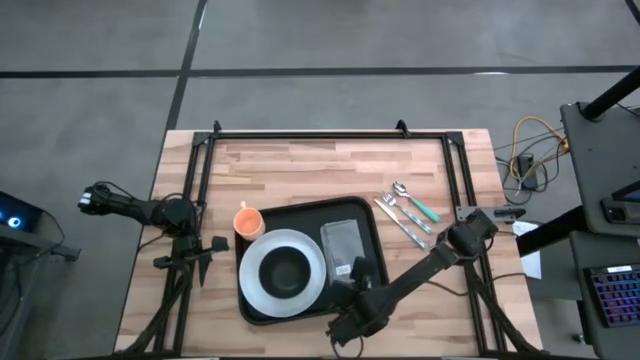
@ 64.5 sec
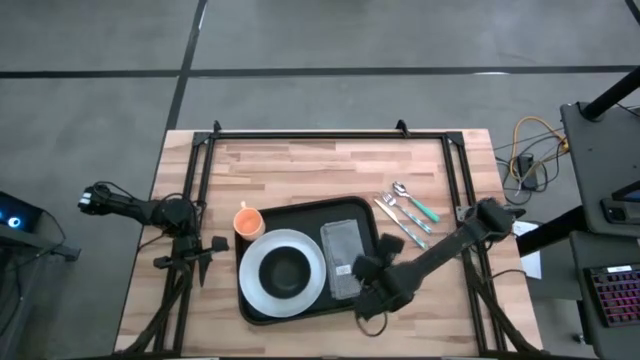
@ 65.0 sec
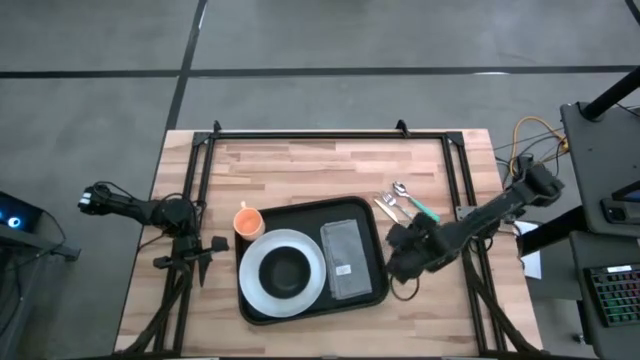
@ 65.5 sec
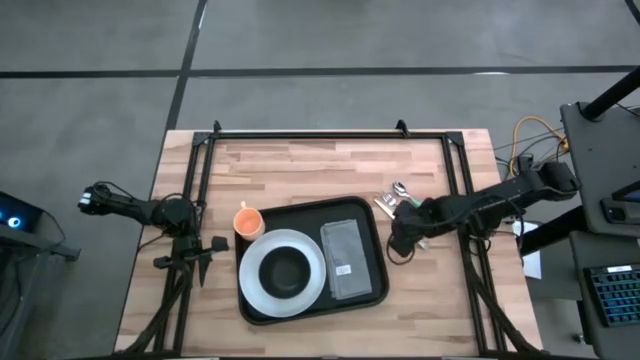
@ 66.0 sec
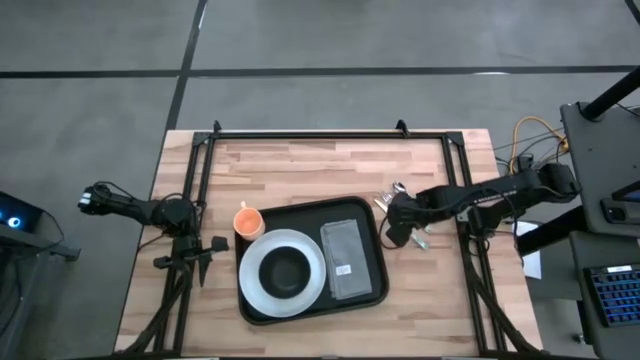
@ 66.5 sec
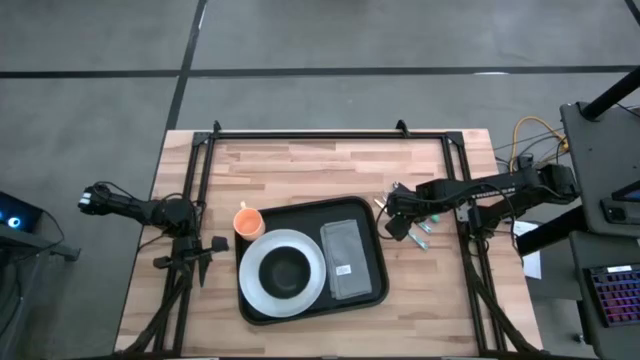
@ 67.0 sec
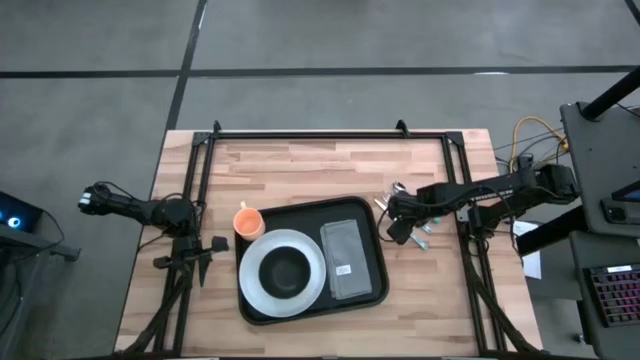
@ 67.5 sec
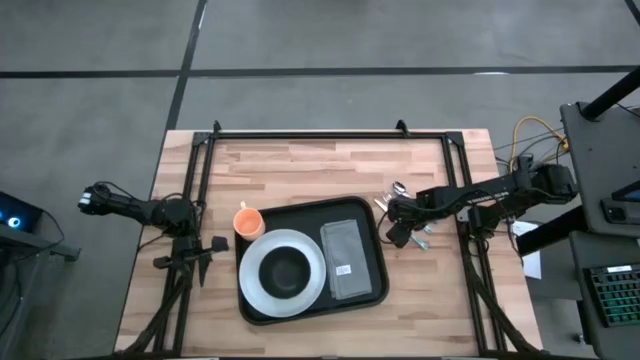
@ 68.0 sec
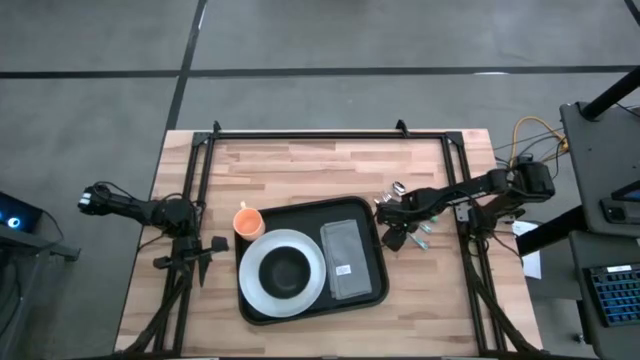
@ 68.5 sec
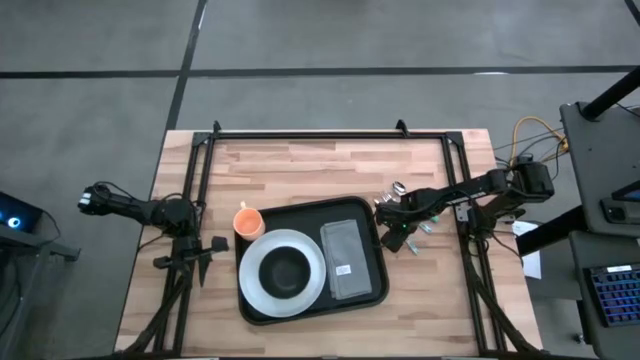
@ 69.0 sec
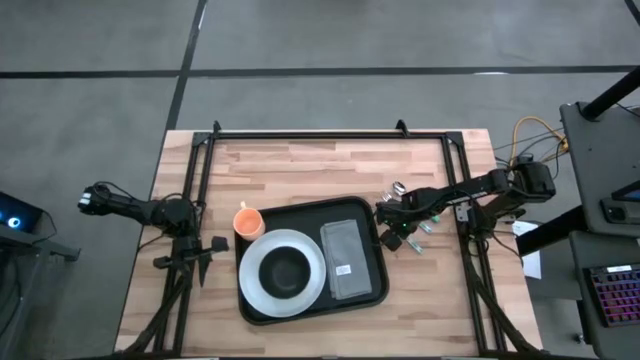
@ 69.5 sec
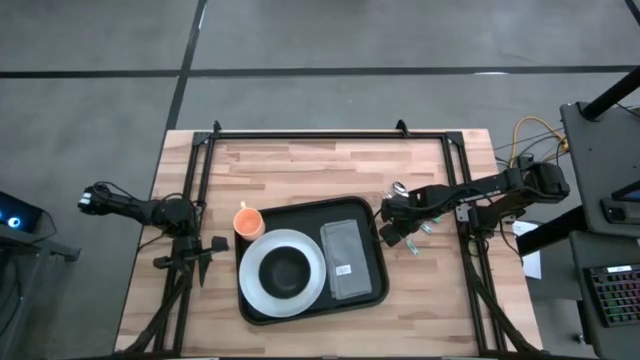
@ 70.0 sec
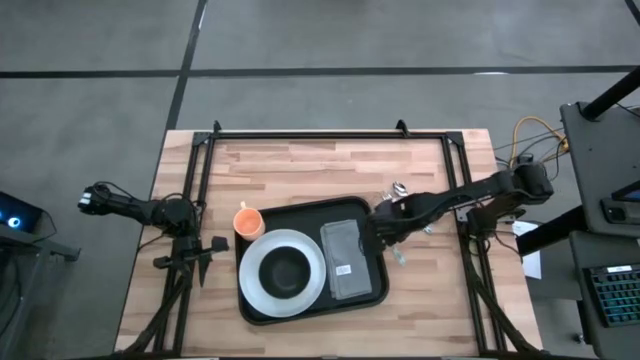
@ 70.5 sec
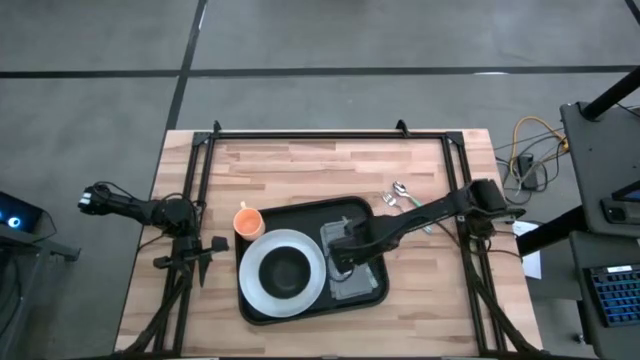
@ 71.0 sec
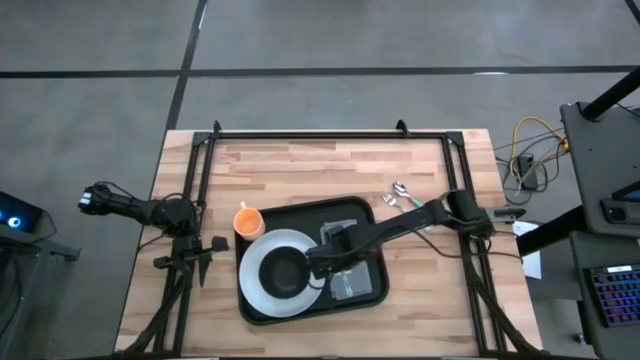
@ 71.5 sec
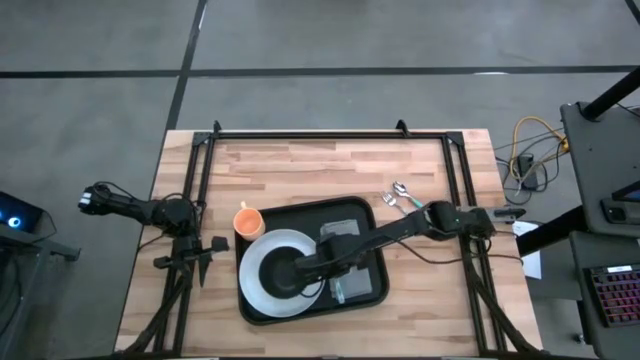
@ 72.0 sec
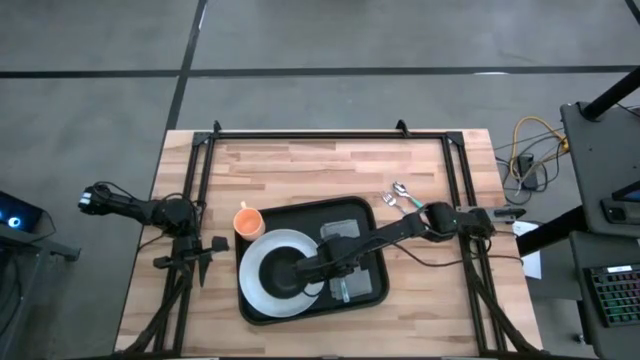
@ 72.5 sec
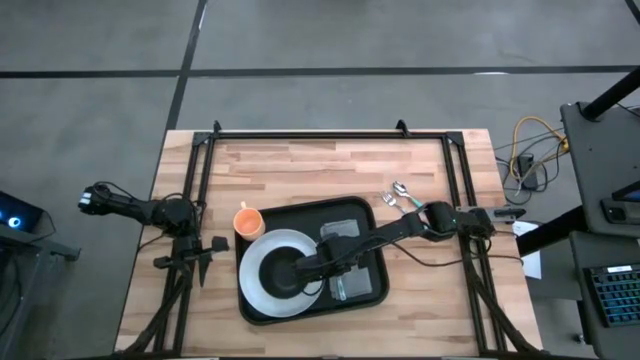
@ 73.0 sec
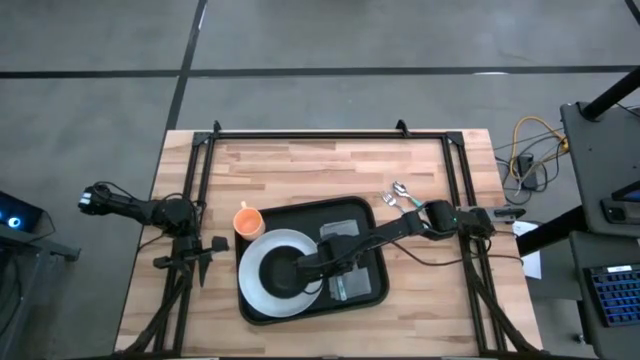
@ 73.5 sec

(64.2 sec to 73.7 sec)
Task: Set up tray
Put the blue knife into the gray napkin on the black table tray

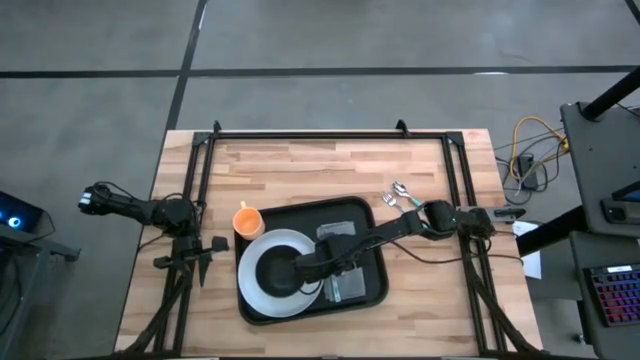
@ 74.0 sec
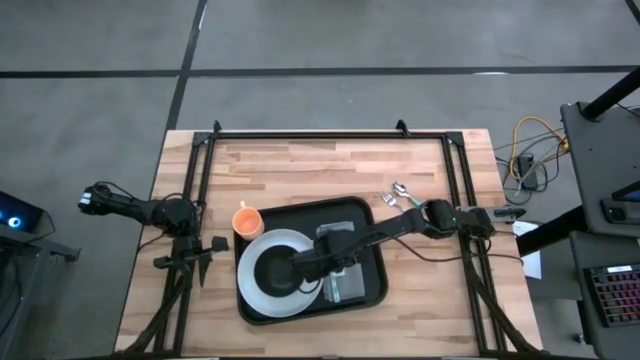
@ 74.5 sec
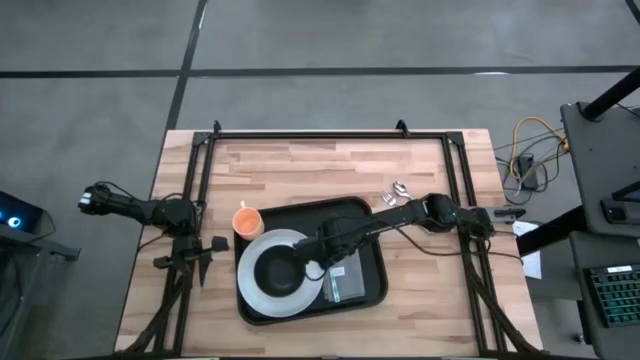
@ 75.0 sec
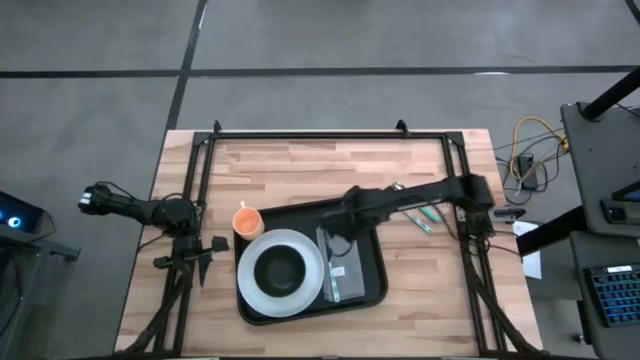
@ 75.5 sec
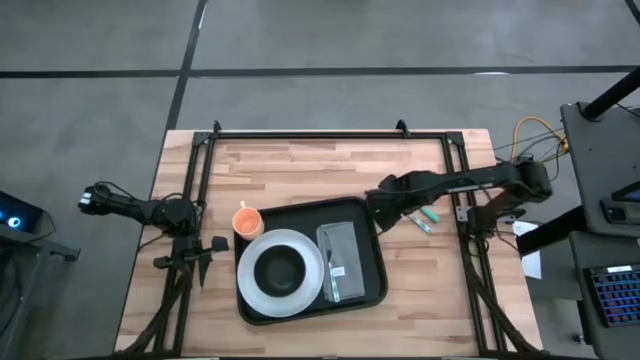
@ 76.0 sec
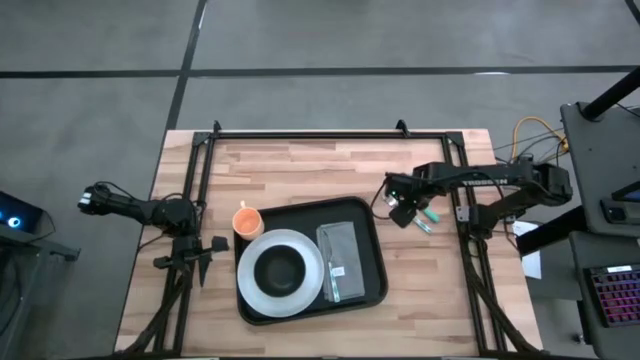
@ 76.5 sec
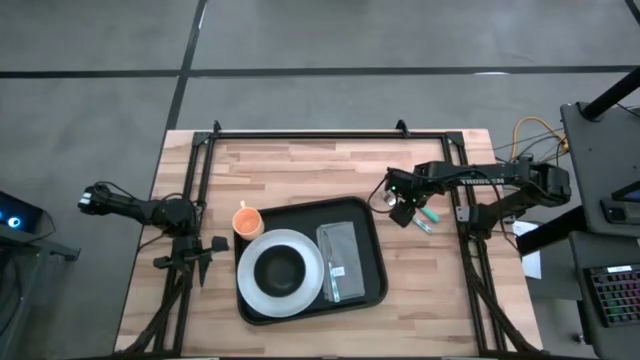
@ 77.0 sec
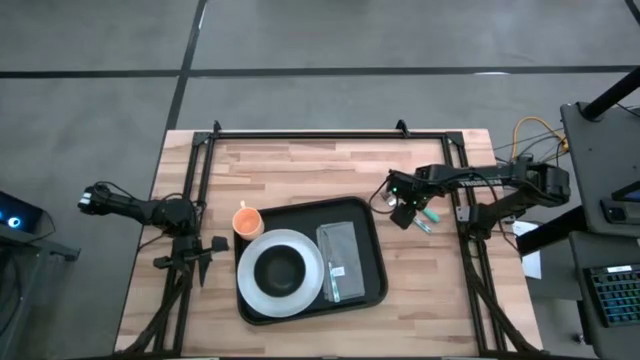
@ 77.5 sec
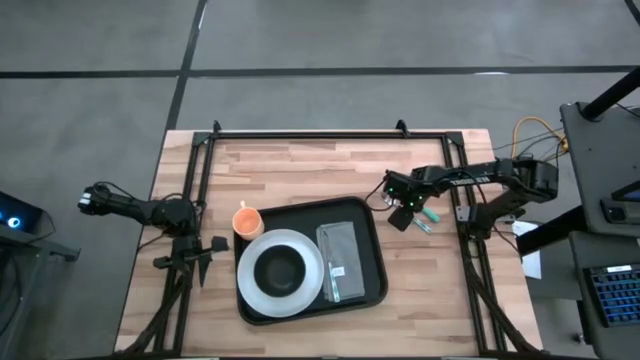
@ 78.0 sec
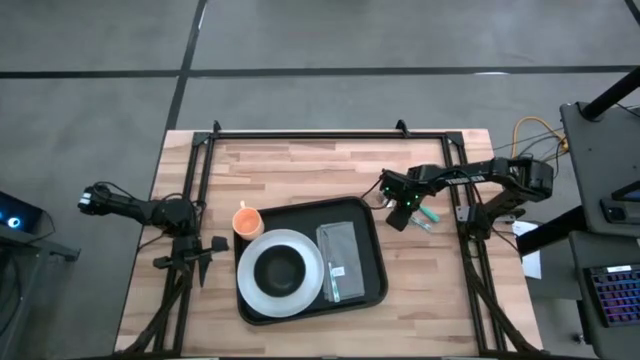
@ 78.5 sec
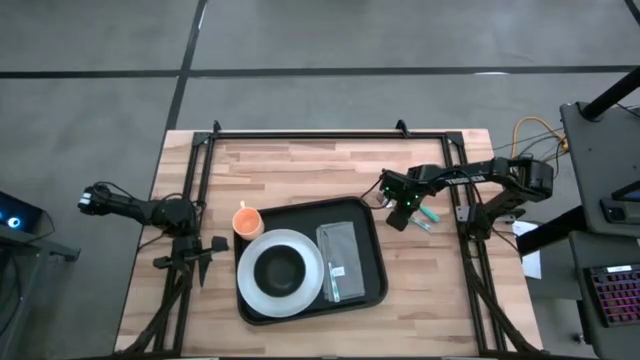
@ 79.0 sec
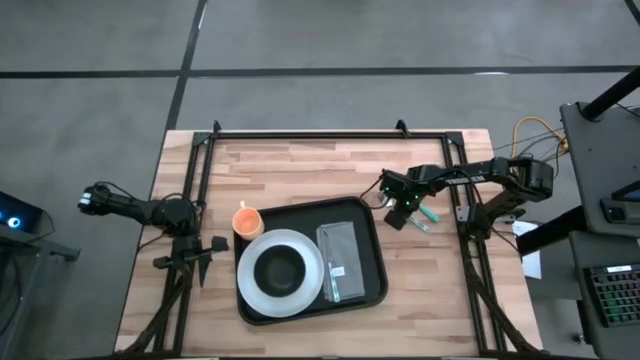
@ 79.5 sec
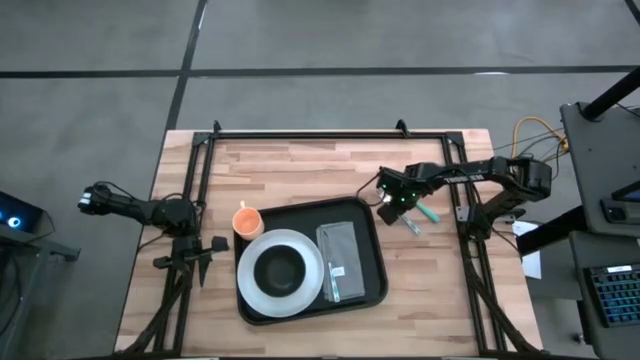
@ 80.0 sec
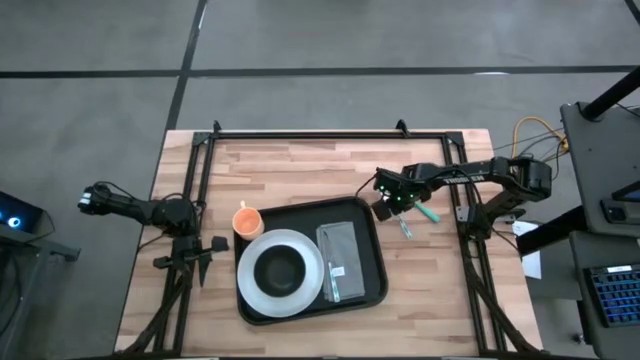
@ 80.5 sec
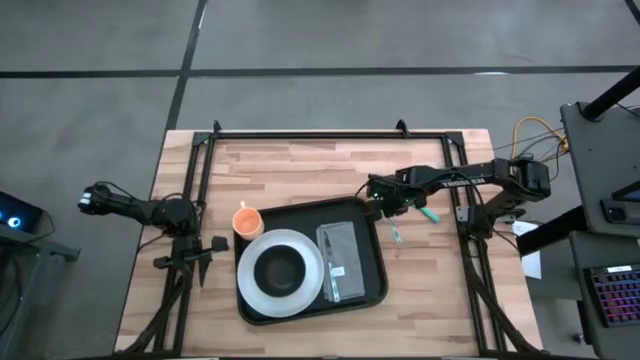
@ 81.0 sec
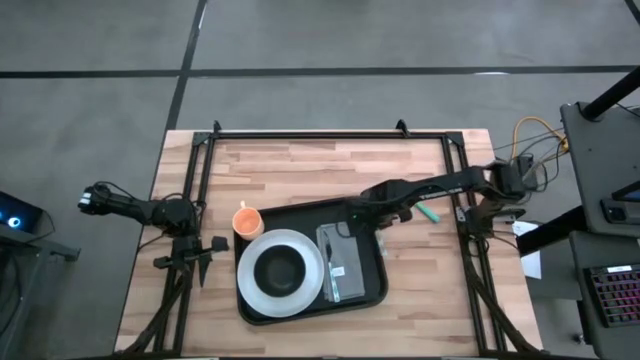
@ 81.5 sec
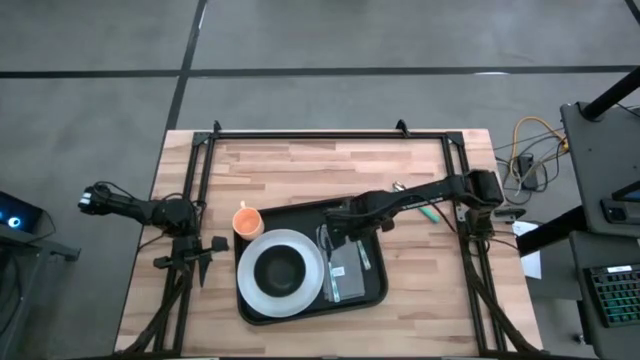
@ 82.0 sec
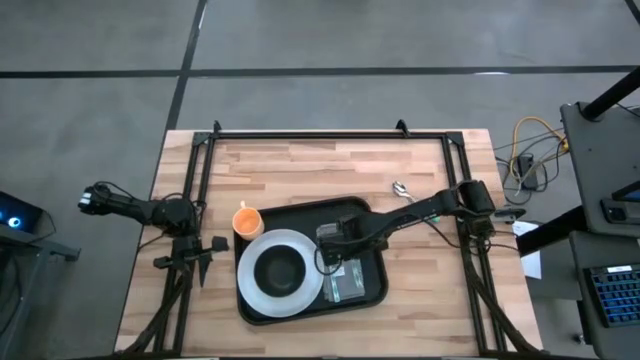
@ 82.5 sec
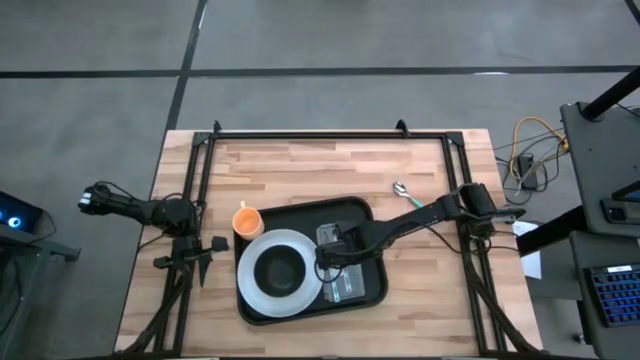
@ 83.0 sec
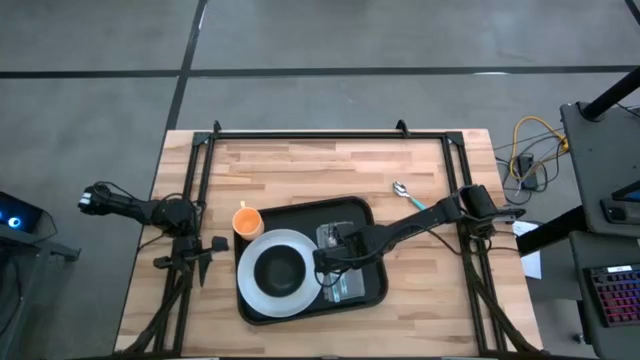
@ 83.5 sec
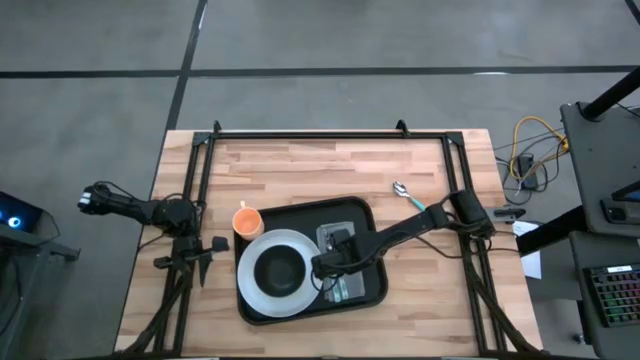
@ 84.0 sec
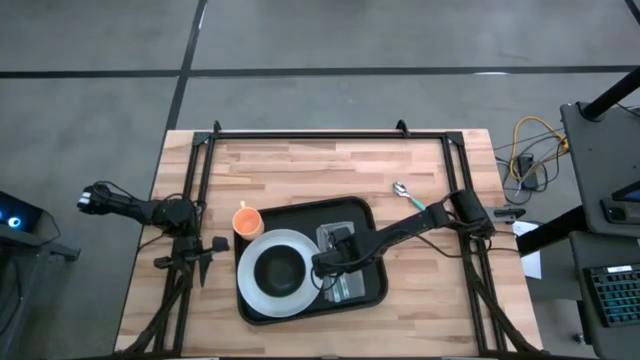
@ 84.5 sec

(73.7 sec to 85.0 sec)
Put the blue fork to the right of the blue fork on the black table tray

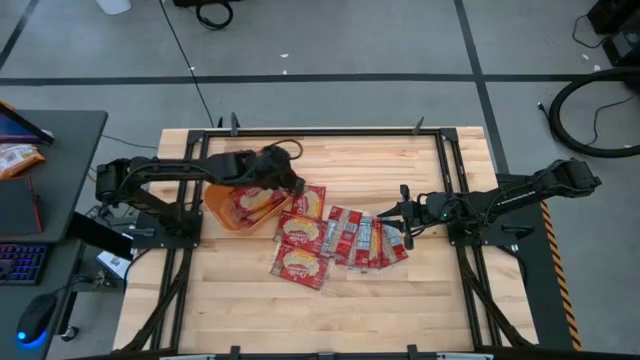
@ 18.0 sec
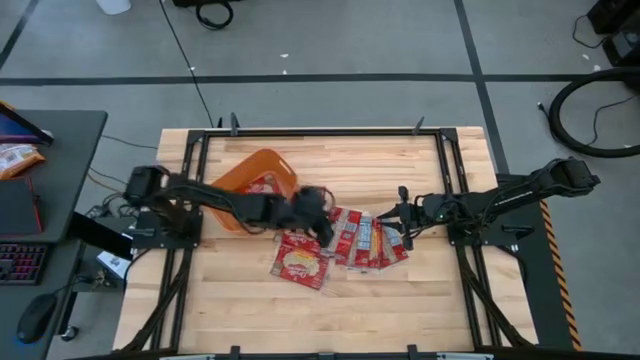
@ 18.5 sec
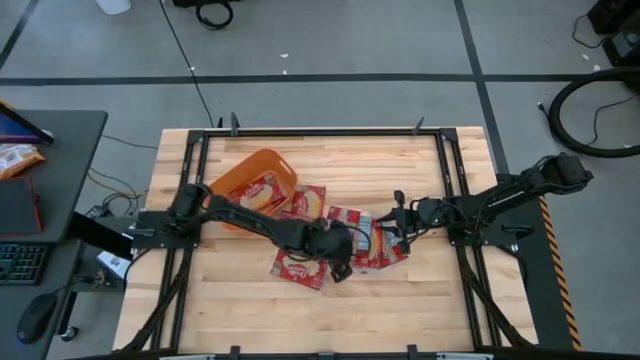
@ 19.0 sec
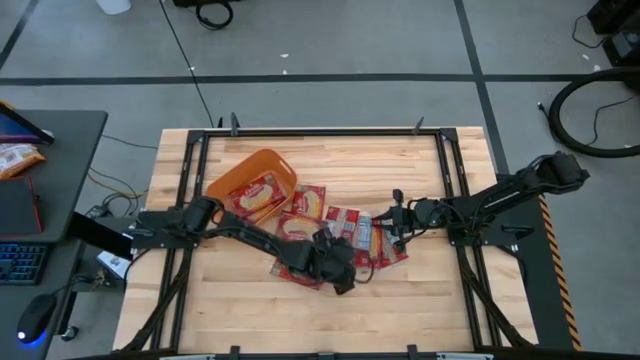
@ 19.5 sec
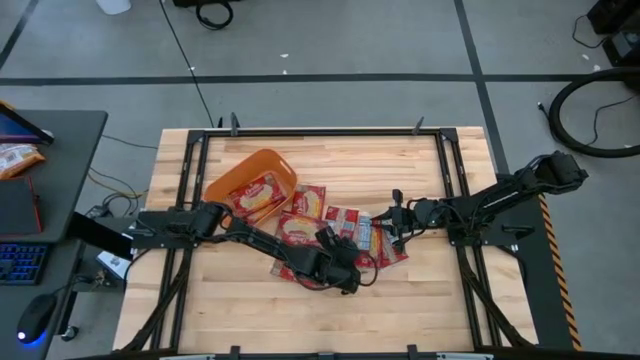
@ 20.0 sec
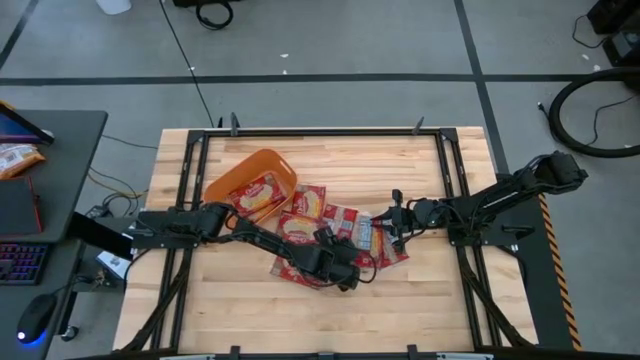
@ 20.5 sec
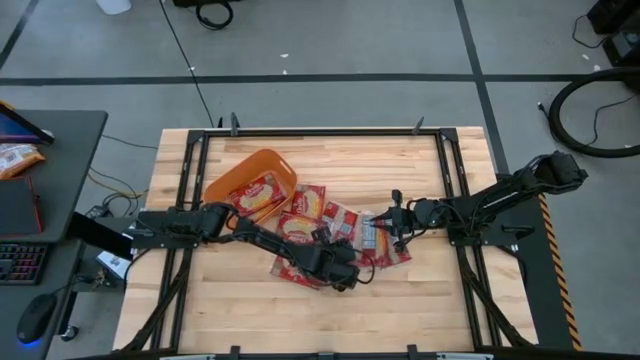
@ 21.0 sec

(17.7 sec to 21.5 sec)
Task: Sort popcorn bags into baskets
Put the red popcorn bag into the orange bin
